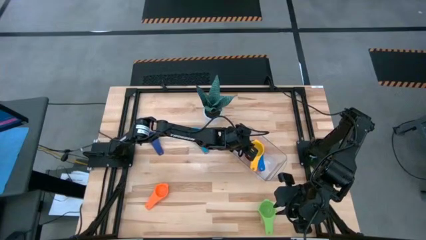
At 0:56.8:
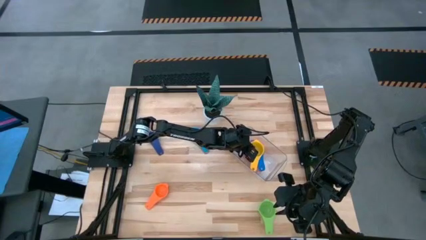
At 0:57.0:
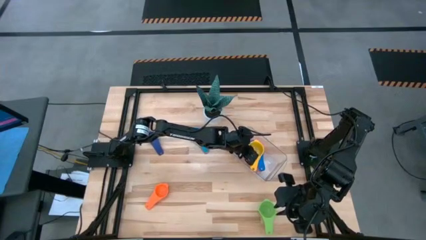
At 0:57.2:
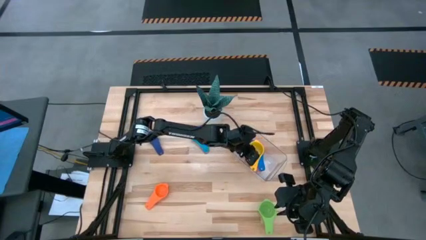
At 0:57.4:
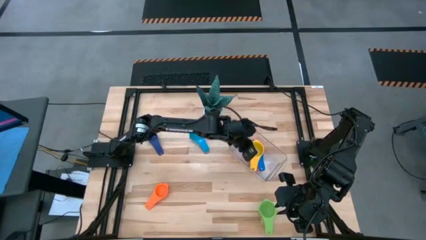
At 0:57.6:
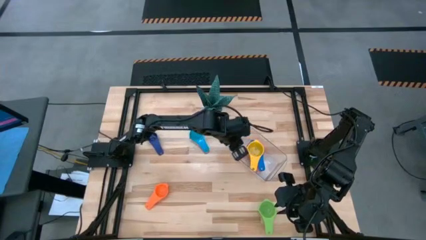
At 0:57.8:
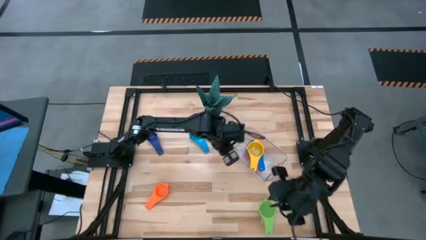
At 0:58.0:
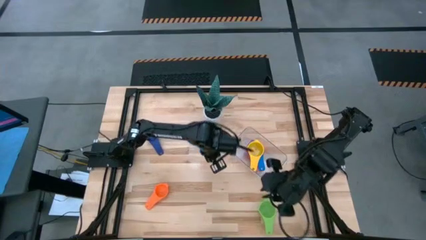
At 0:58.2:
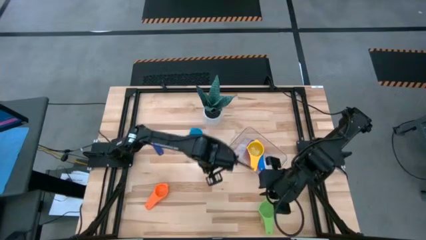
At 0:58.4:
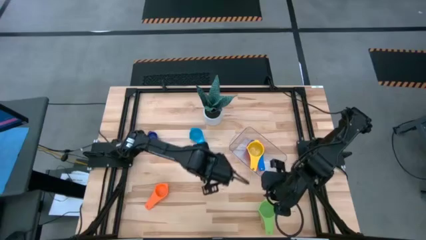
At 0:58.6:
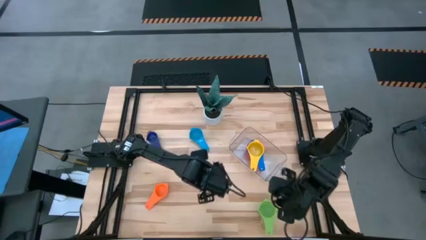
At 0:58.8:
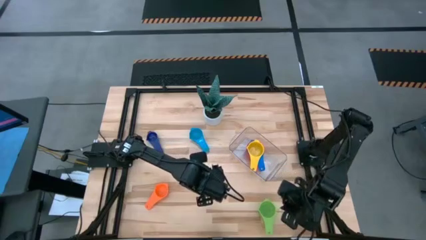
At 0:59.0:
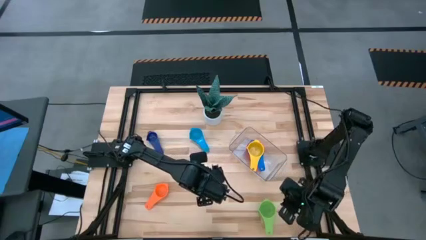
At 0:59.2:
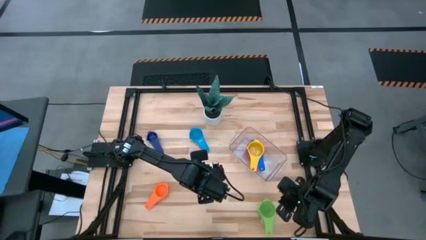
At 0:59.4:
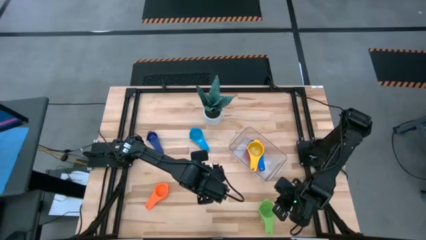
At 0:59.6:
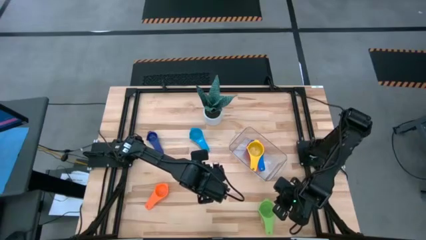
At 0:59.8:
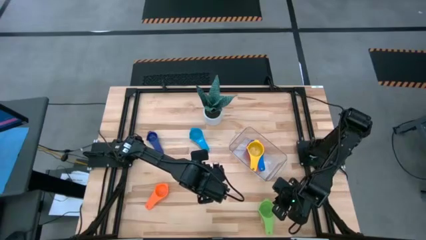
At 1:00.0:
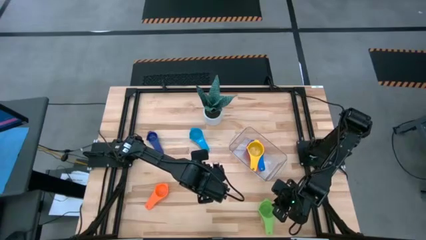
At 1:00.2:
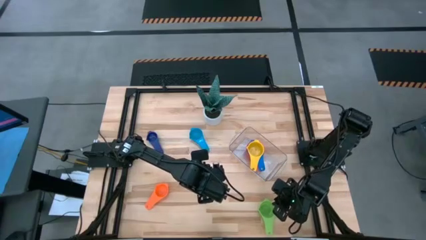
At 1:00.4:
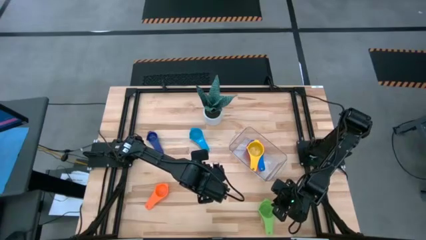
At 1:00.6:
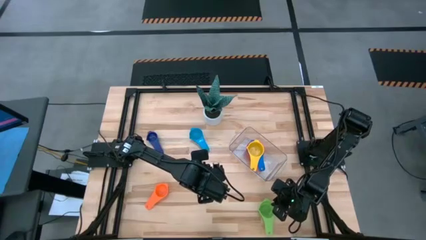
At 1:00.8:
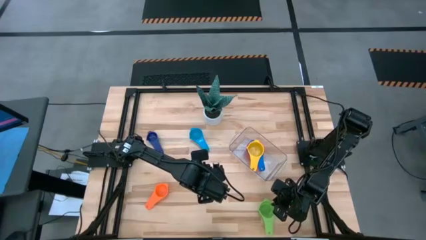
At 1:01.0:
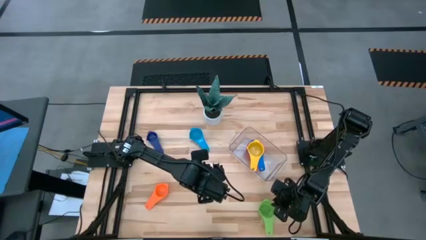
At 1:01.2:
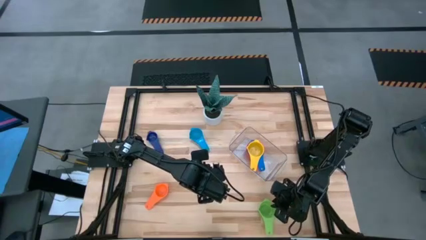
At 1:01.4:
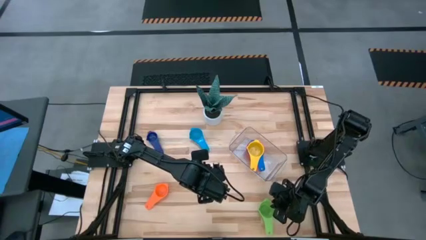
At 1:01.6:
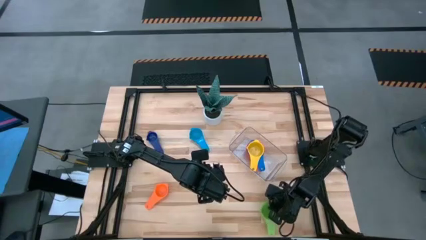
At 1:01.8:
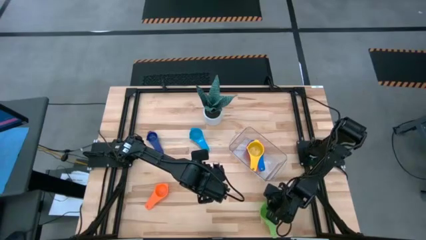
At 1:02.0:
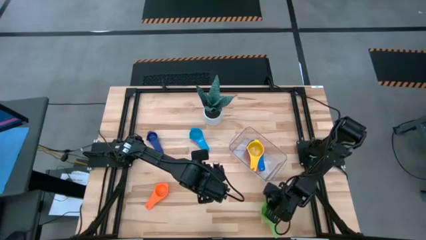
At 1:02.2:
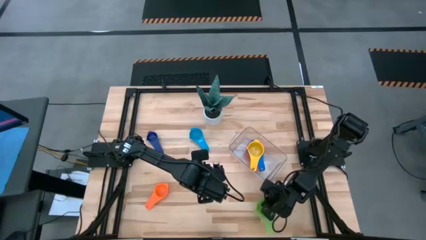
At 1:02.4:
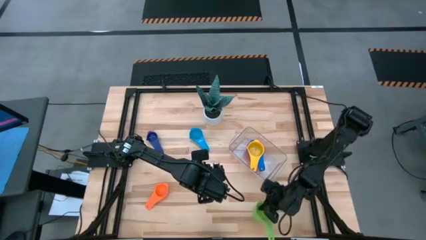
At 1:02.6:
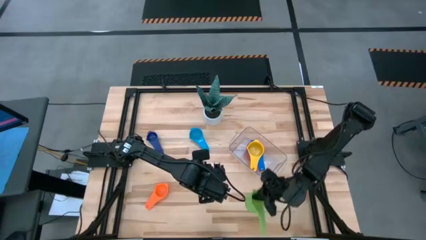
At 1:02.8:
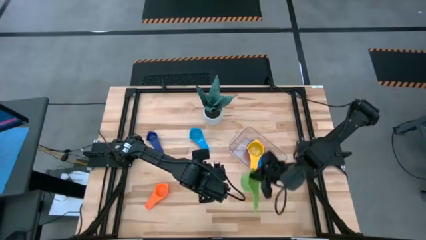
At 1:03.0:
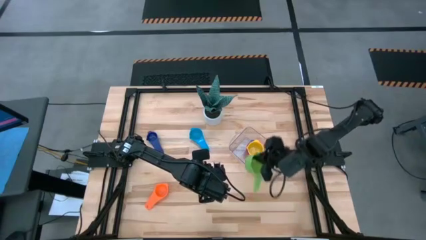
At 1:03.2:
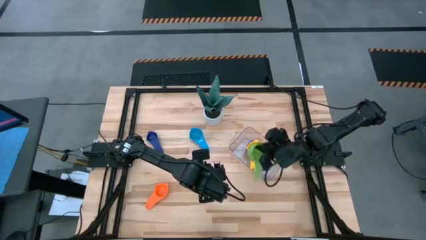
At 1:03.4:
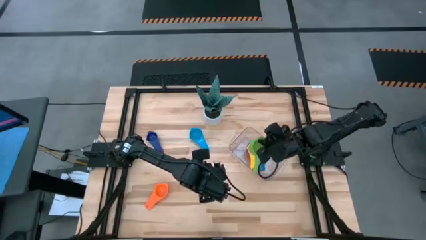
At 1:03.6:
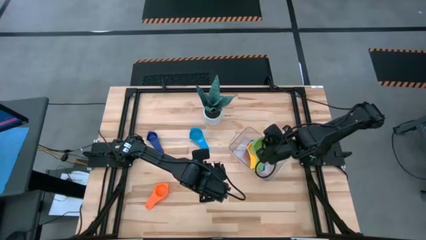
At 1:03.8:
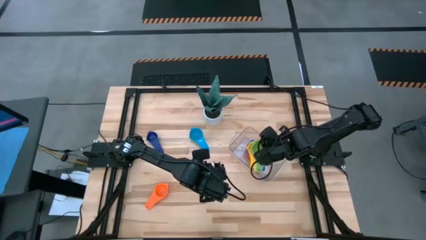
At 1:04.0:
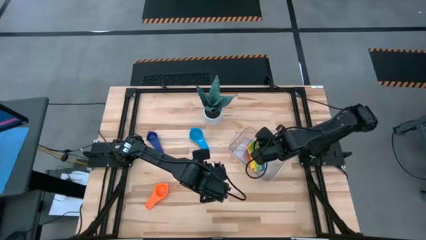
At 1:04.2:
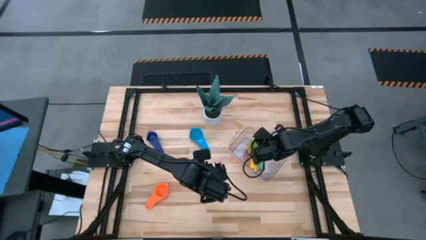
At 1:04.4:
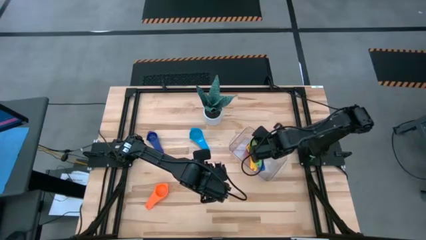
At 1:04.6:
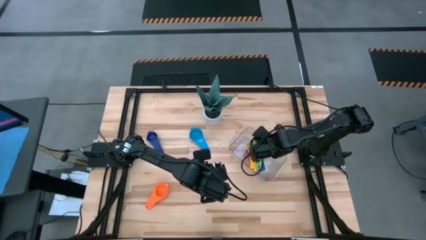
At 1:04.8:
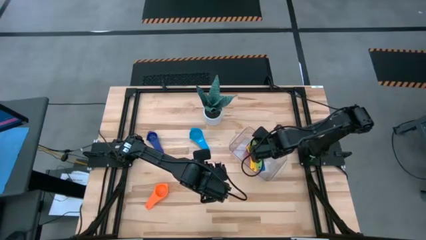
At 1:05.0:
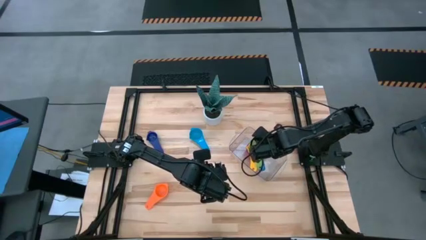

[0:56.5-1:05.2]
Task: Nest measuring cups in basket
Stack the green measuring cup on top of the yellow measuring cup

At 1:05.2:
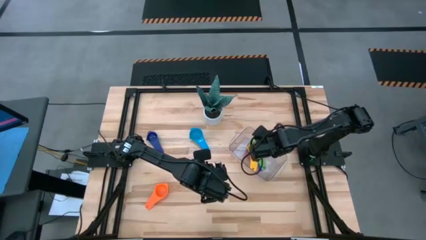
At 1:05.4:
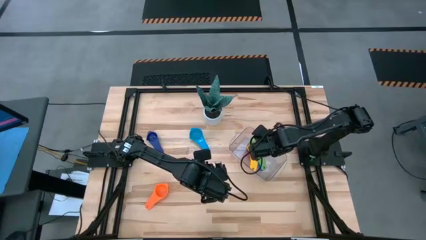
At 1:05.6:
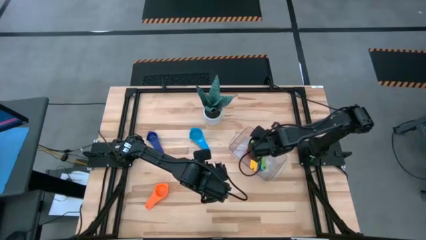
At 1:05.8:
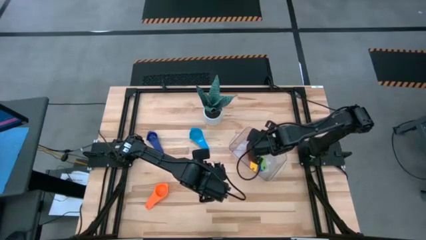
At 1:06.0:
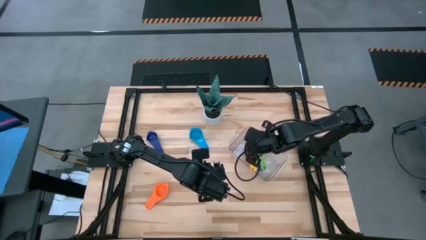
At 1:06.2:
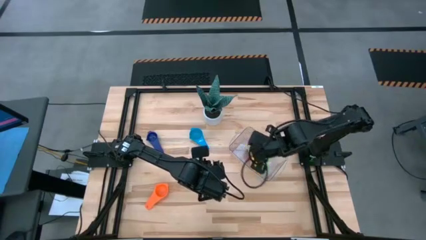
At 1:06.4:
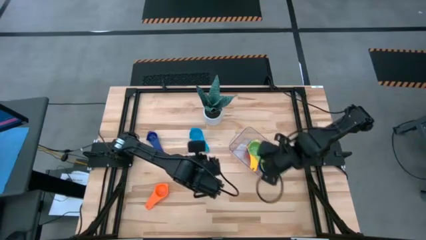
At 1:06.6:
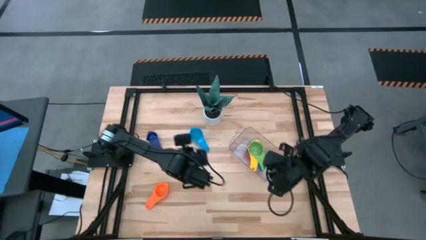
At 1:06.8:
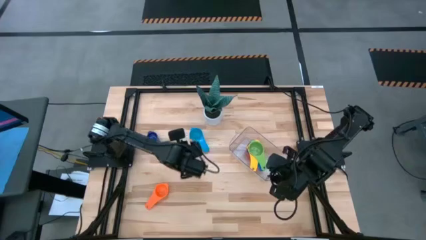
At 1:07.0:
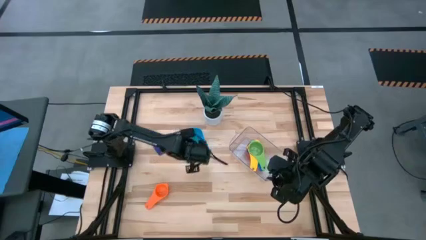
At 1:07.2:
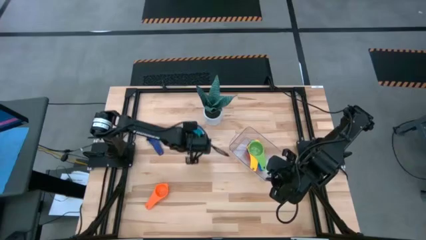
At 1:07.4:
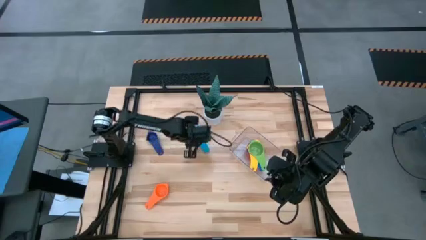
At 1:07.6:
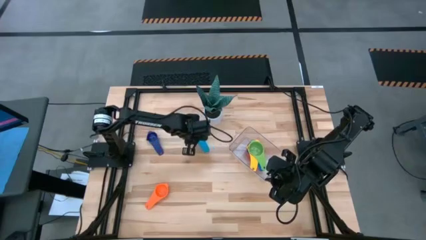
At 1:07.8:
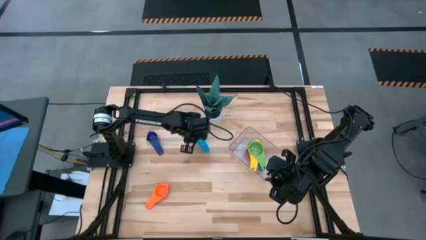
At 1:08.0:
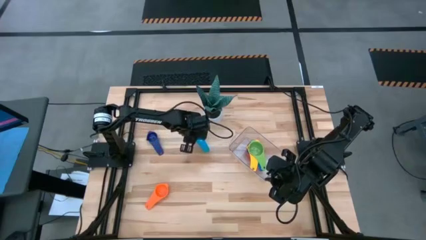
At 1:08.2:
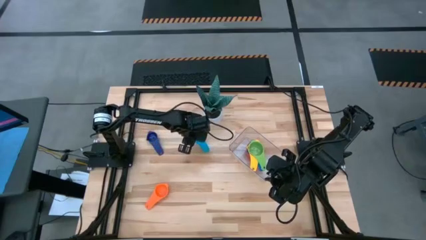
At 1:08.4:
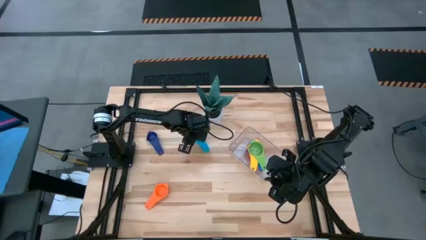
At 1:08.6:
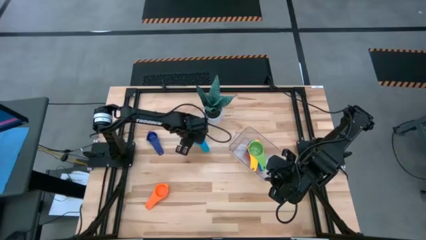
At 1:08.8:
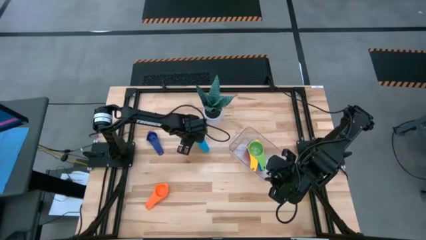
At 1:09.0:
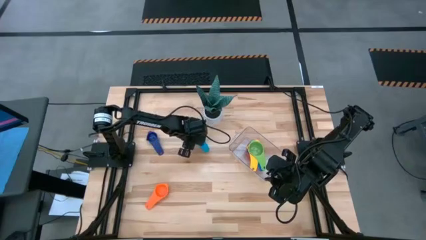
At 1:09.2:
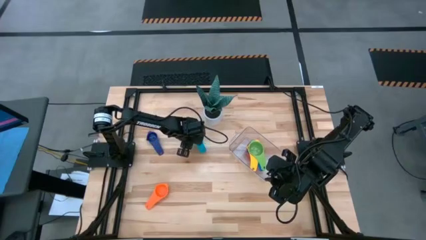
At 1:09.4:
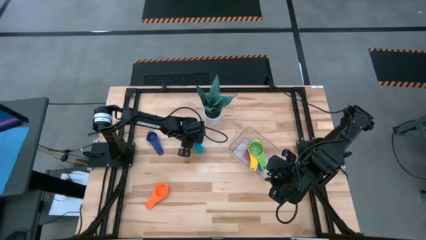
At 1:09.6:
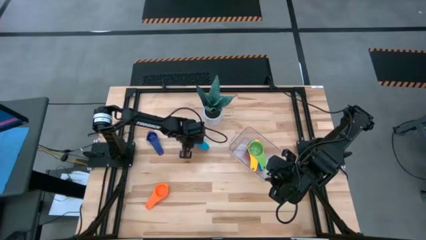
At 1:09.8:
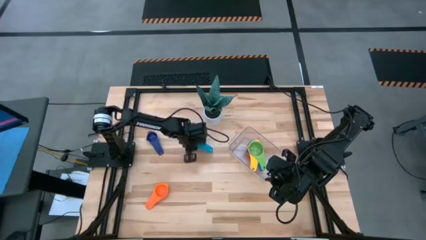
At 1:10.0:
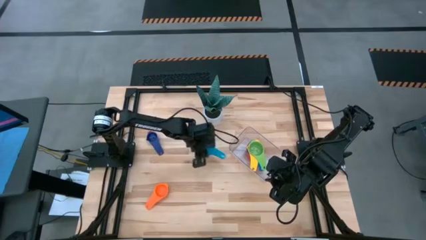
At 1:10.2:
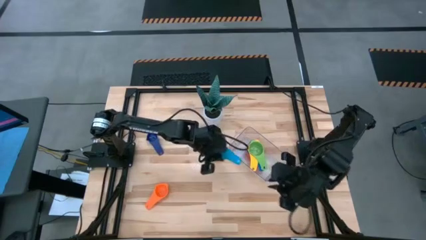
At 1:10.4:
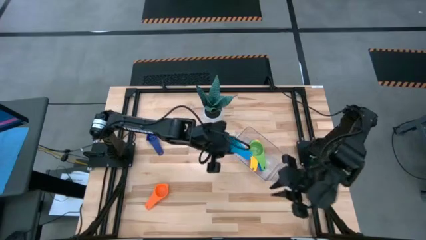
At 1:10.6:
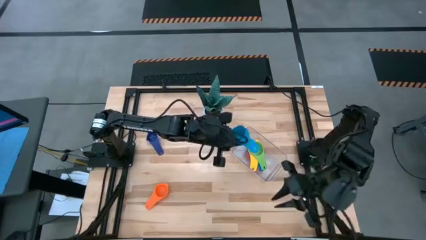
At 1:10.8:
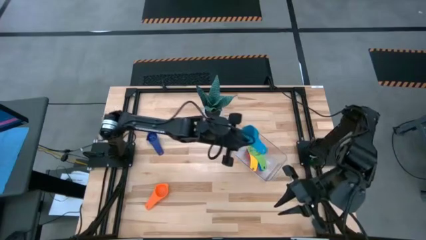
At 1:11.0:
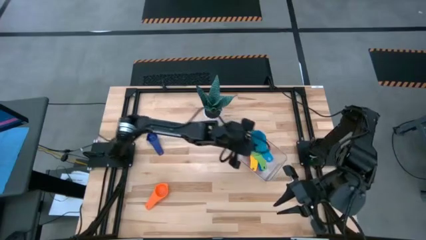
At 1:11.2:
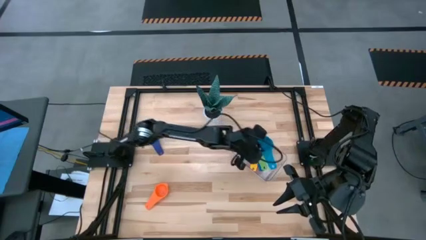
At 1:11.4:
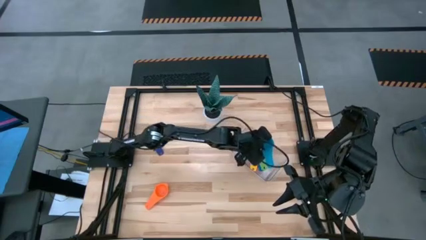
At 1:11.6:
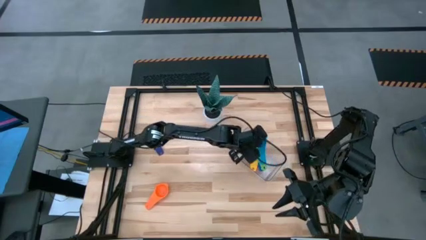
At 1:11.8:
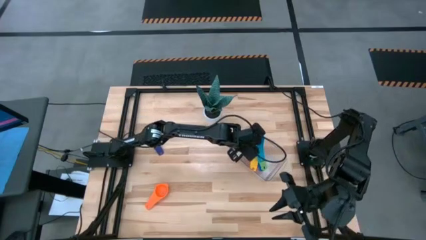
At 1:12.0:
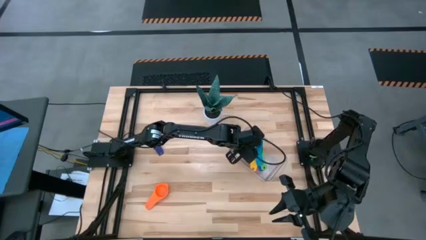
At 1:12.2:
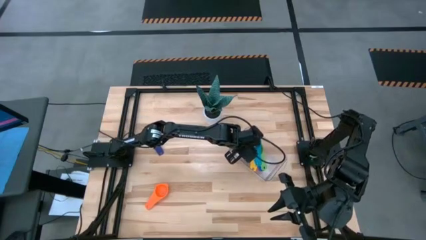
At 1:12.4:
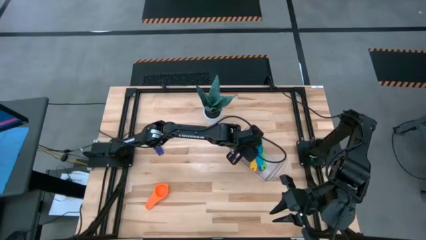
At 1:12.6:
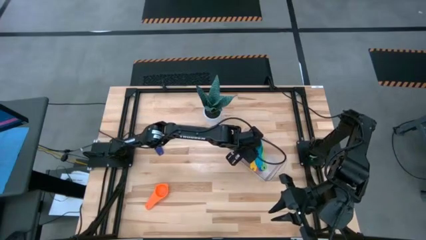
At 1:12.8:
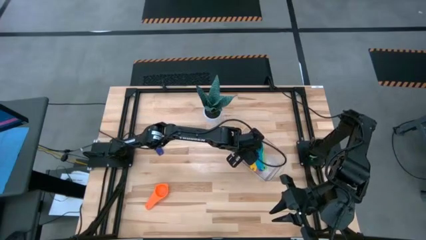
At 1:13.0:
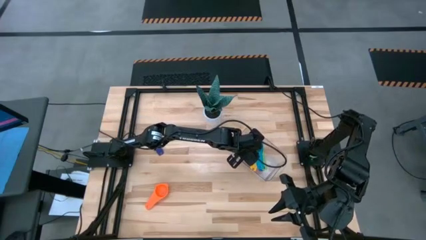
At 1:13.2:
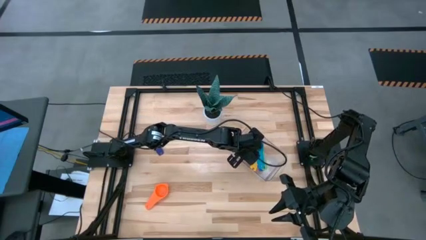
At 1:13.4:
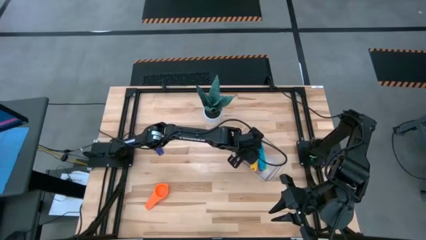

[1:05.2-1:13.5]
Stack the light blue measuring cup on top of the green measuring cup
